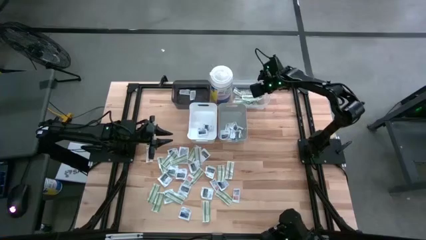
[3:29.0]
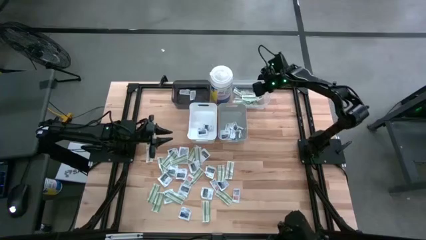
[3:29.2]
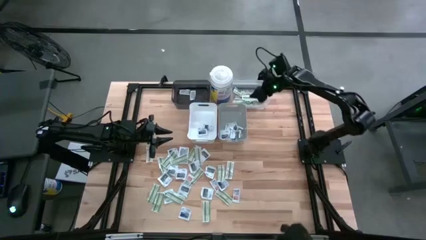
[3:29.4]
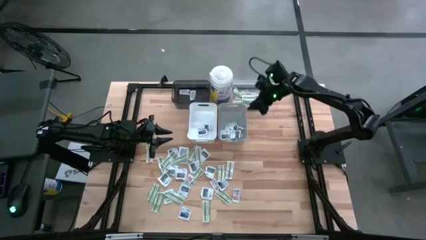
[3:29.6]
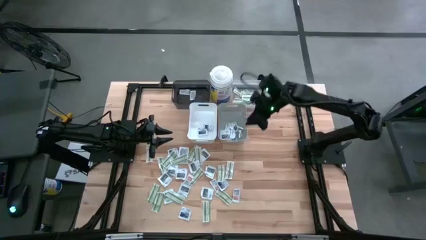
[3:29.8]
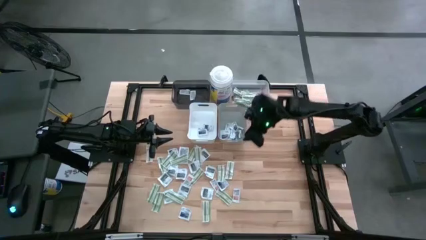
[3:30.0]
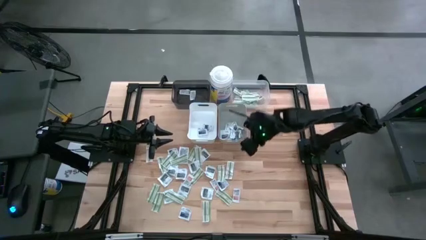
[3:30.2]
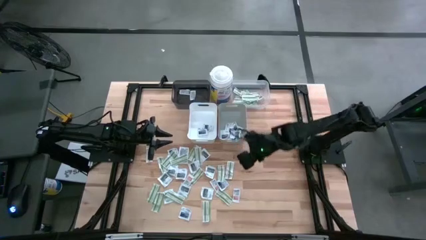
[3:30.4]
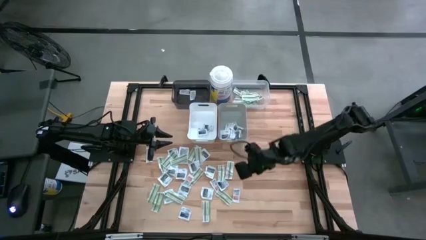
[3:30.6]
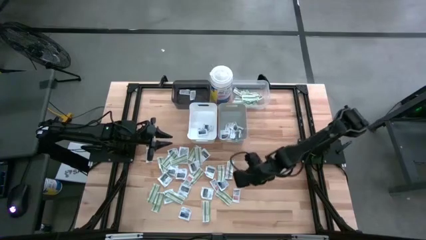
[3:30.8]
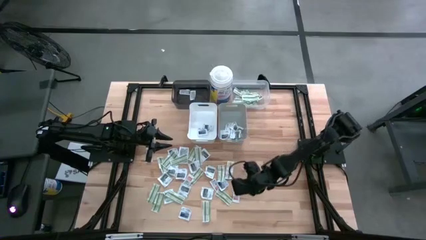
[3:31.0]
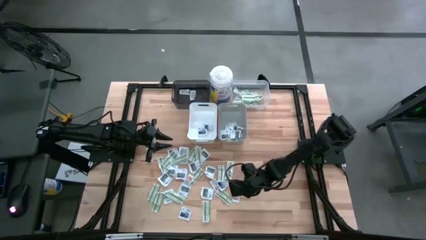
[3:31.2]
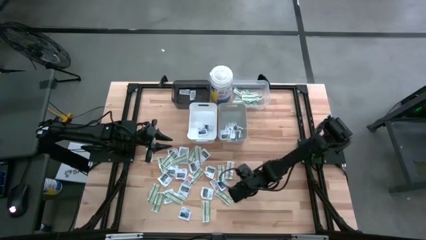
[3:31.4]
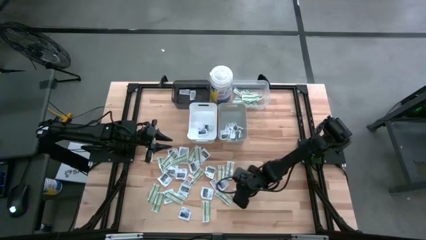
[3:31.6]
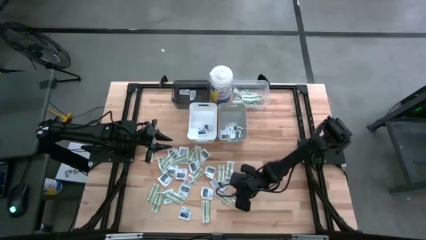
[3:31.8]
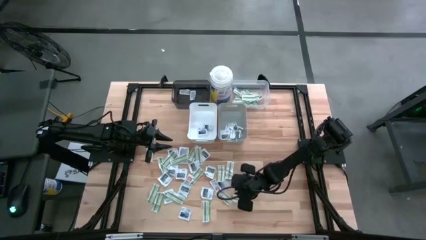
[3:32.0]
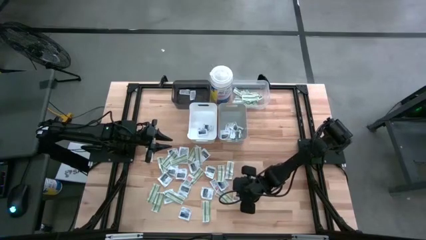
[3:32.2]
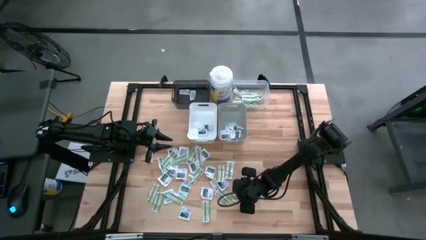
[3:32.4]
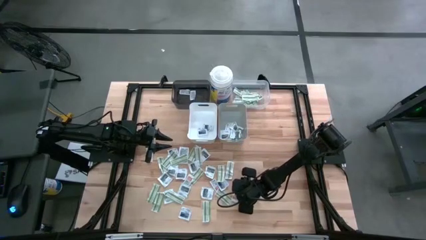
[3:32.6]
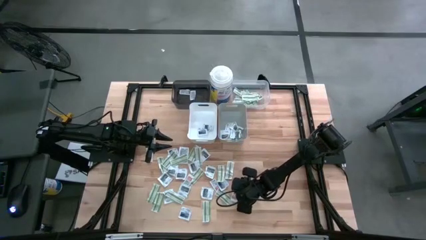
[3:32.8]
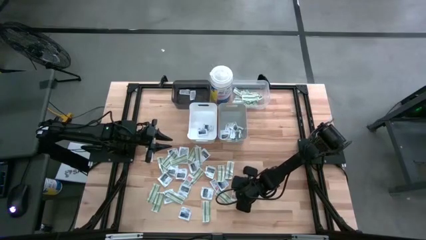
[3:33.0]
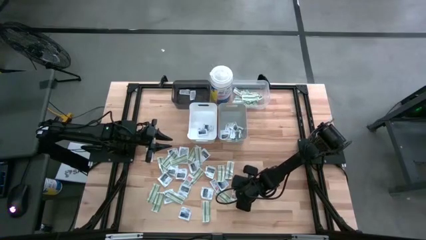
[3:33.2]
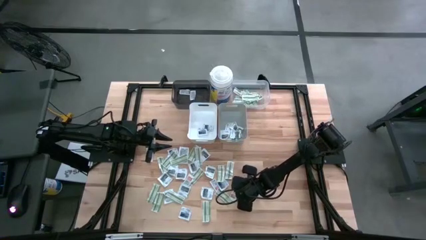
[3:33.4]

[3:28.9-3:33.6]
Task: Pick & Place First Aid Supplies
Put the ointment into the black transparent bin

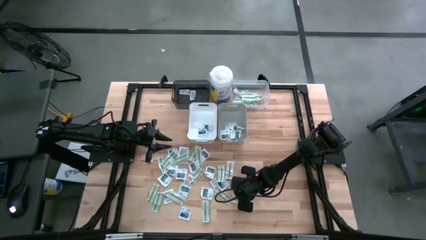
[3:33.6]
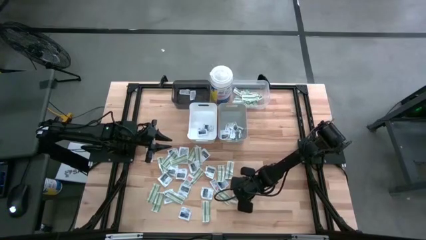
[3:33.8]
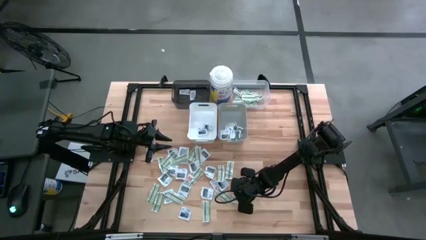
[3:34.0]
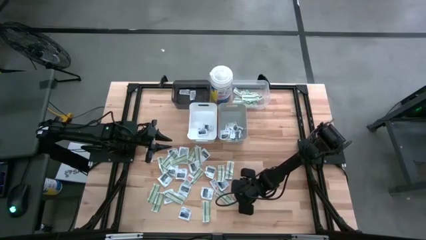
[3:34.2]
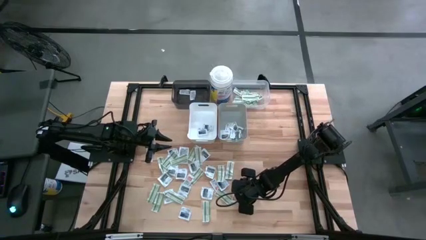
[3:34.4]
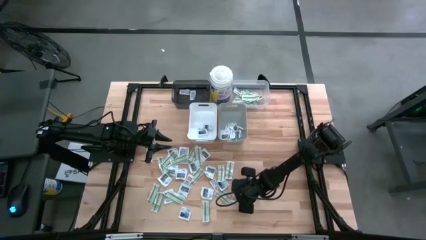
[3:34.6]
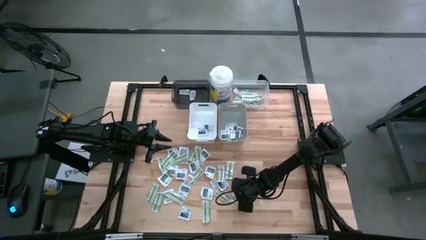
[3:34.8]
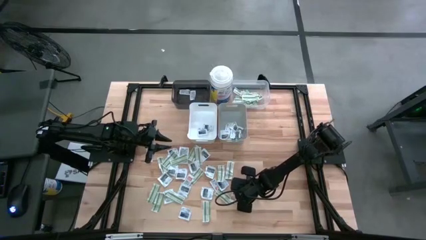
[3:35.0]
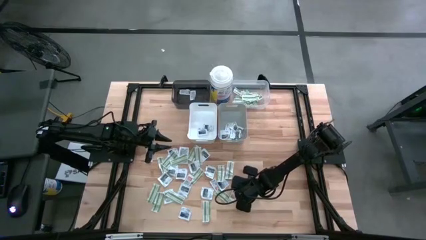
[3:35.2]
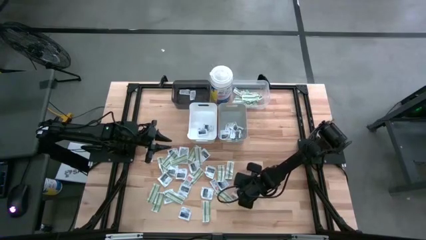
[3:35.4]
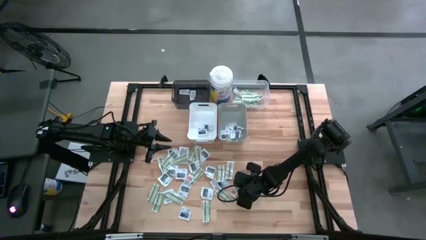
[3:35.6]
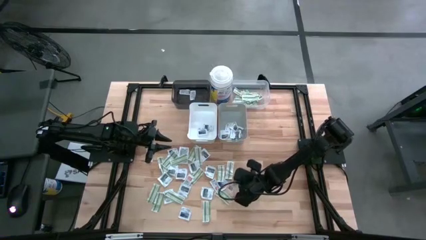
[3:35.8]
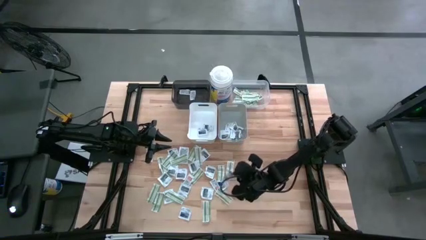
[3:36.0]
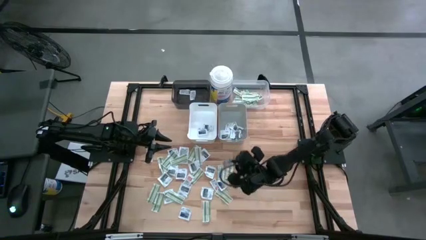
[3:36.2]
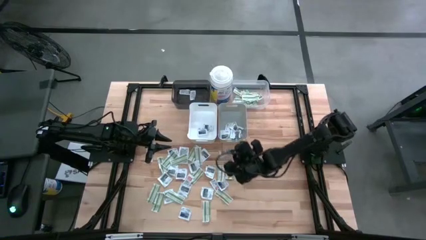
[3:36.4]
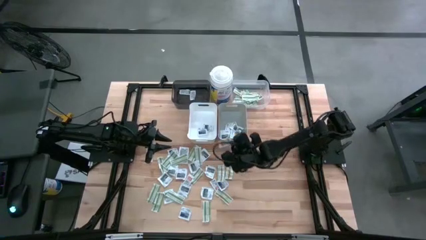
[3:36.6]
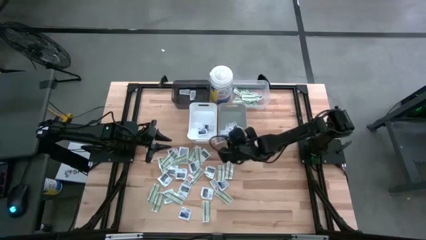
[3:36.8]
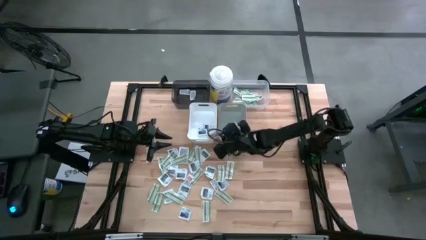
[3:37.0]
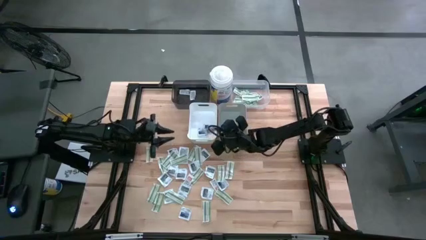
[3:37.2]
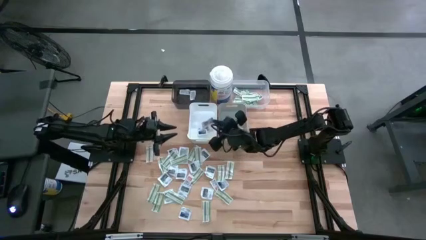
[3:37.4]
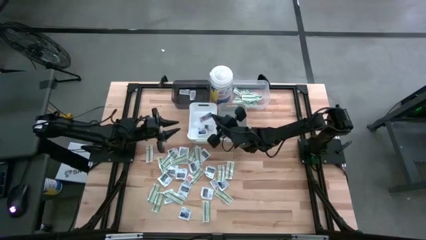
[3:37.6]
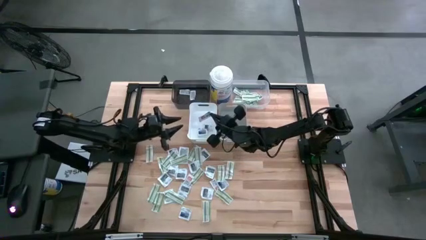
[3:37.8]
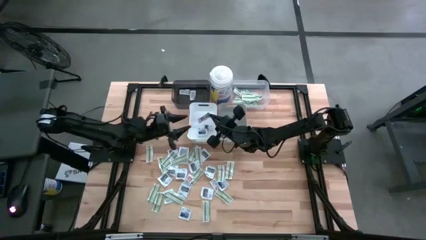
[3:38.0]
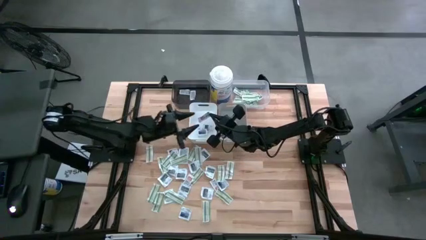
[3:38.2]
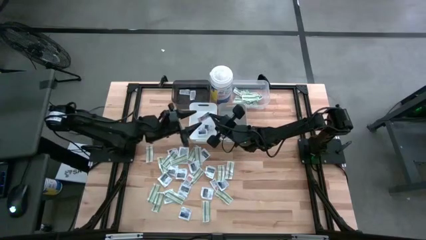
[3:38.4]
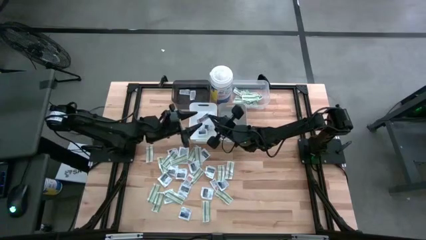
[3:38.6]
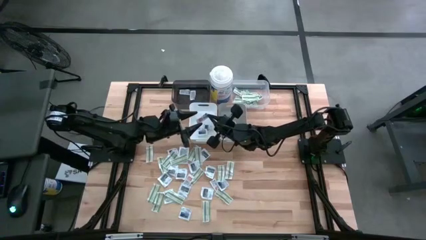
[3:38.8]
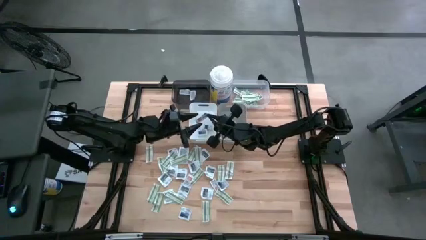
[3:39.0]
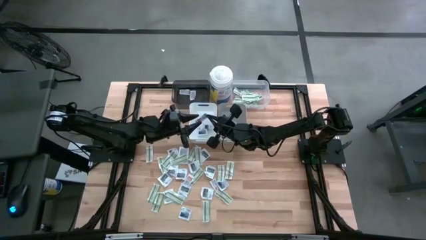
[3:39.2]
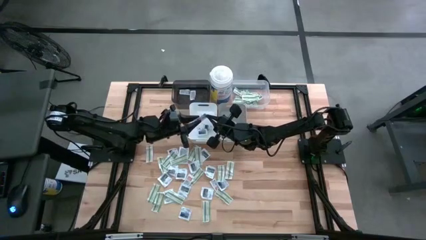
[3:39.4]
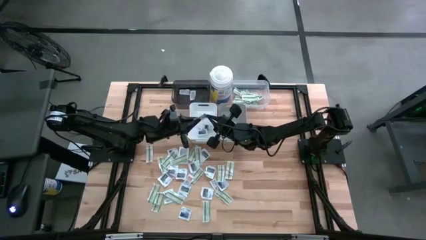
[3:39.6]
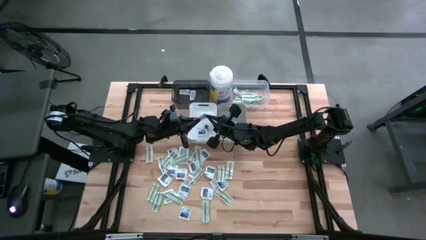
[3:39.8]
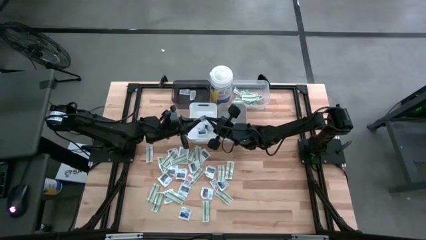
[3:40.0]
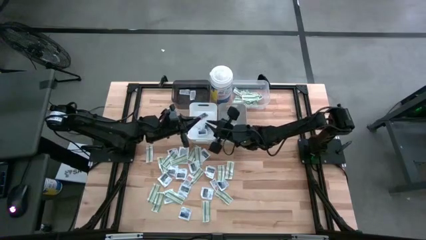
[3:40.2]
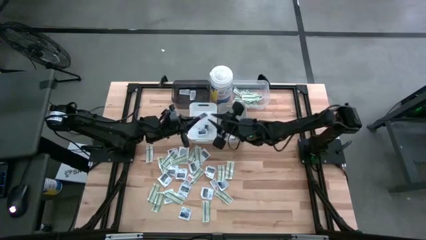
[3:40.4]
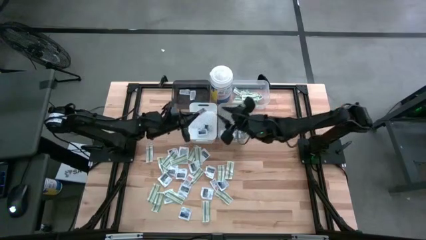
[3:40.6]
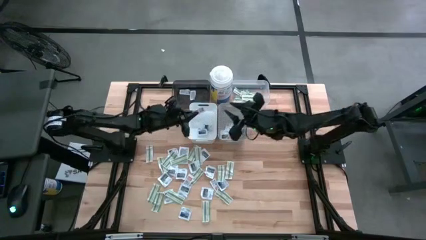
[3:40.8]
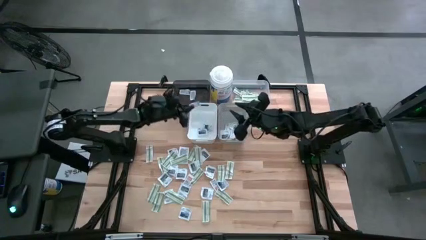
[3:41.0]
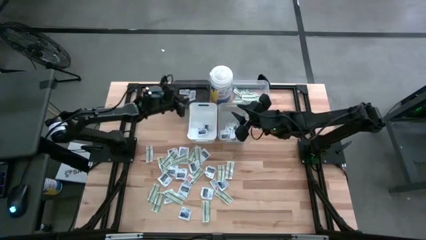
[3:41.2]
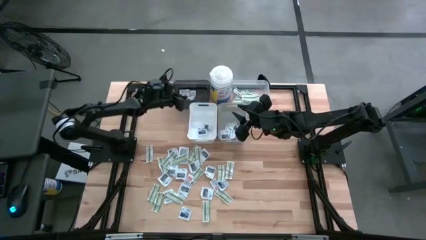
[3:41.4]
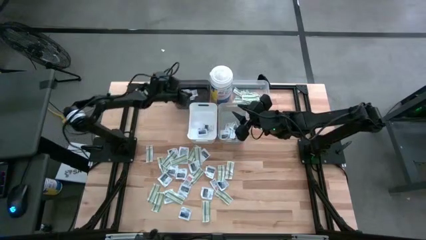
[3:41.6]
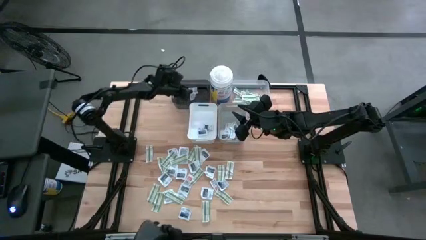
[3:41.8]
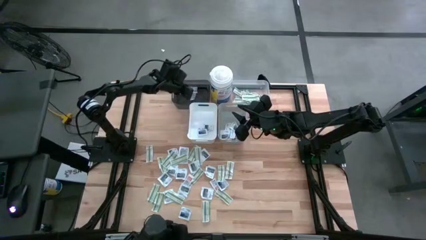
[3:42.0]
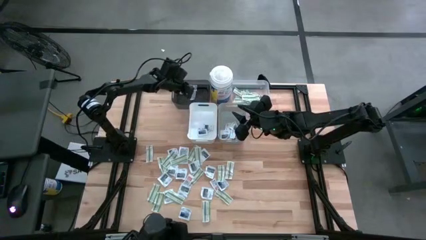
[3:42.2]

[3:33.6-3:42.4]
Put the ointment into the black transparent bin
